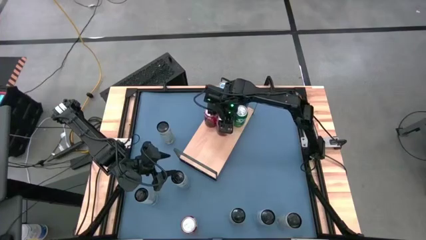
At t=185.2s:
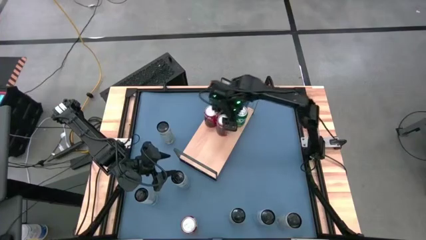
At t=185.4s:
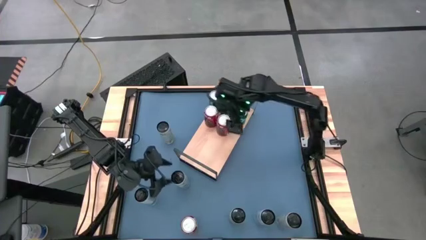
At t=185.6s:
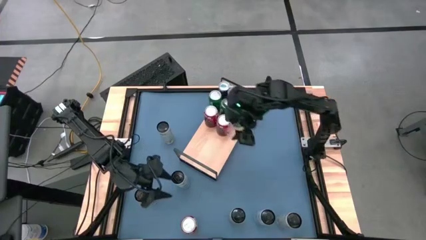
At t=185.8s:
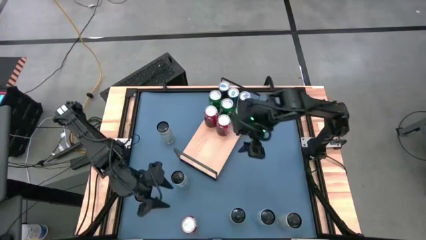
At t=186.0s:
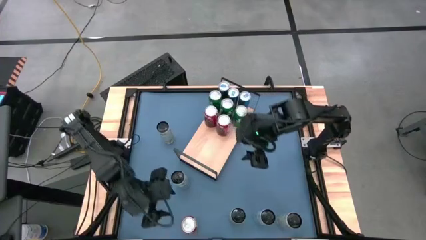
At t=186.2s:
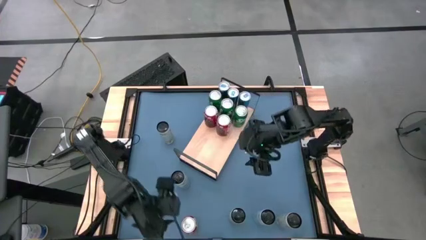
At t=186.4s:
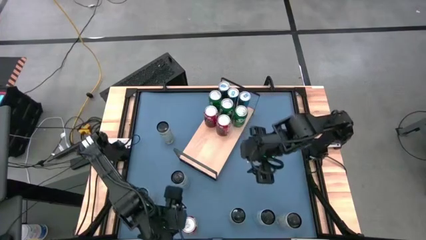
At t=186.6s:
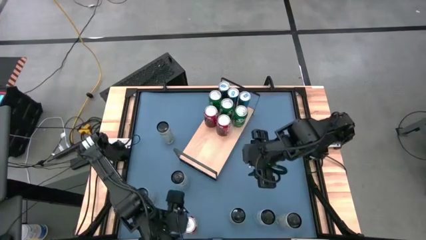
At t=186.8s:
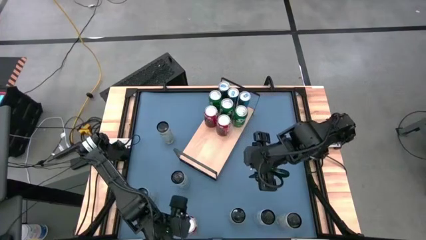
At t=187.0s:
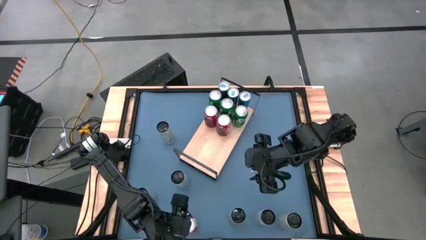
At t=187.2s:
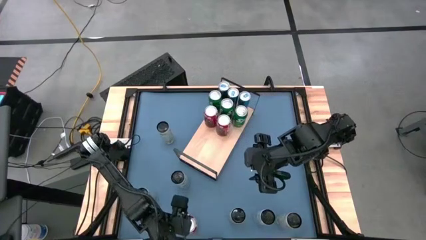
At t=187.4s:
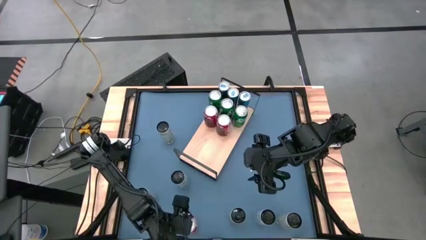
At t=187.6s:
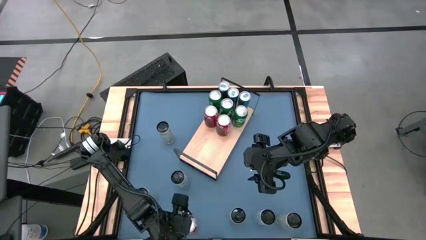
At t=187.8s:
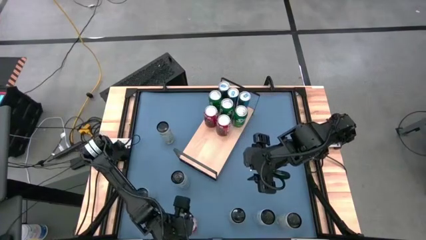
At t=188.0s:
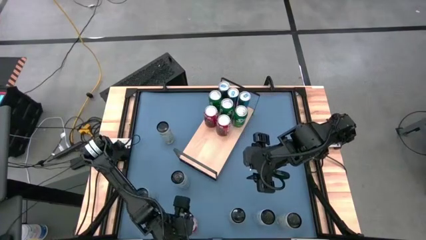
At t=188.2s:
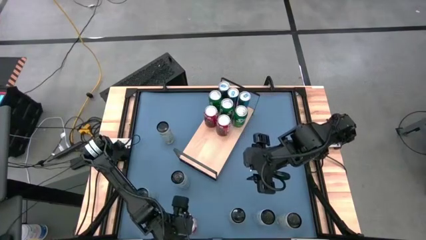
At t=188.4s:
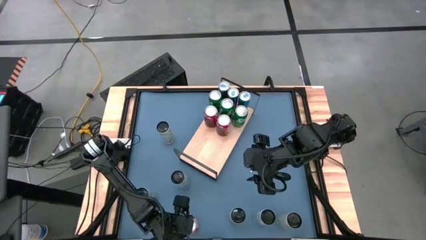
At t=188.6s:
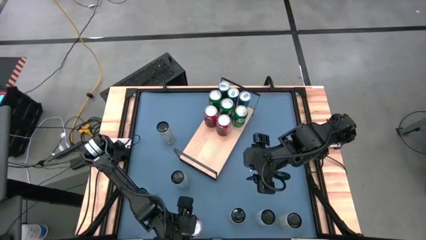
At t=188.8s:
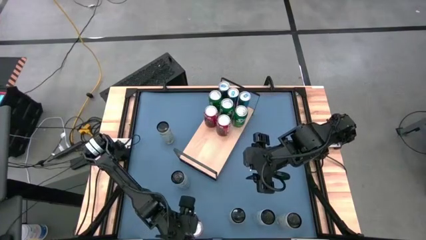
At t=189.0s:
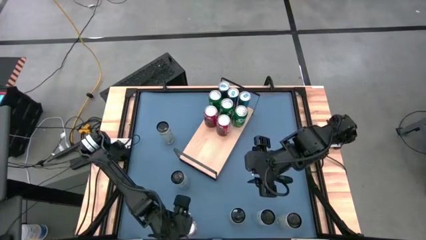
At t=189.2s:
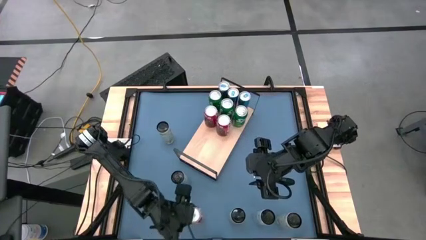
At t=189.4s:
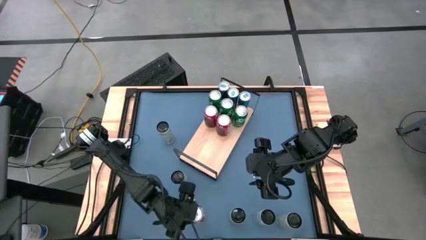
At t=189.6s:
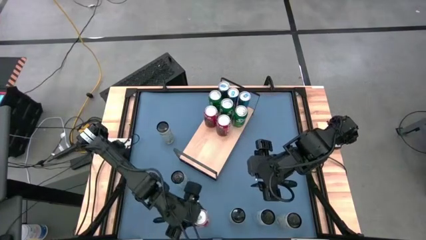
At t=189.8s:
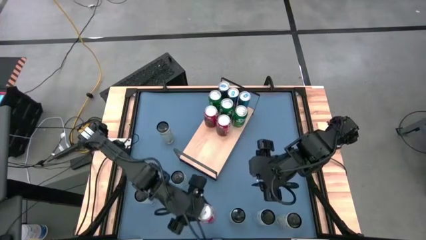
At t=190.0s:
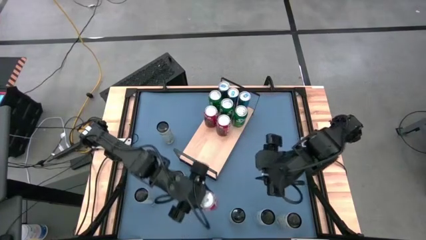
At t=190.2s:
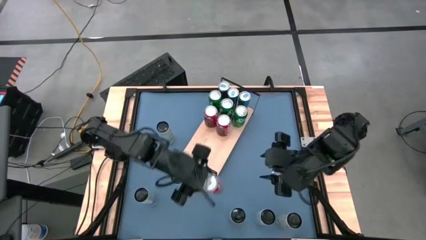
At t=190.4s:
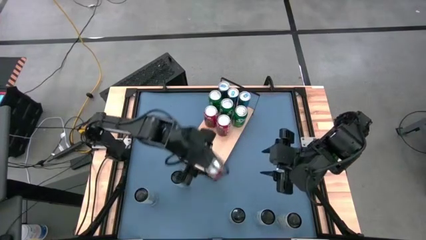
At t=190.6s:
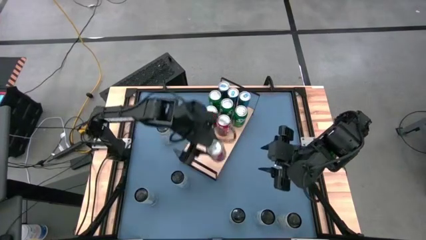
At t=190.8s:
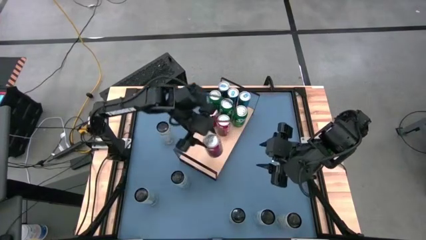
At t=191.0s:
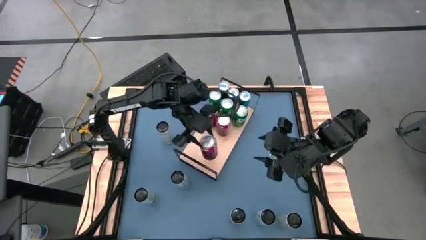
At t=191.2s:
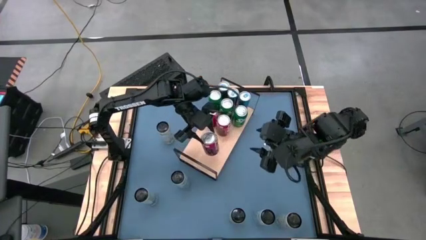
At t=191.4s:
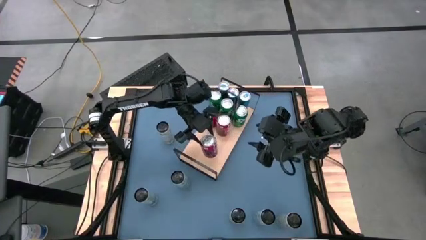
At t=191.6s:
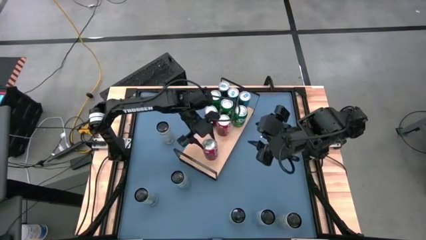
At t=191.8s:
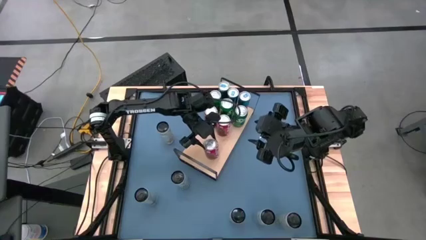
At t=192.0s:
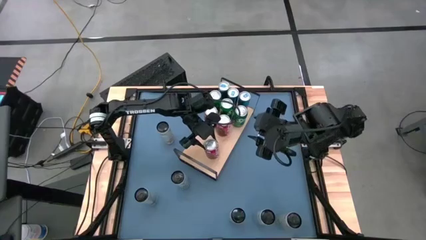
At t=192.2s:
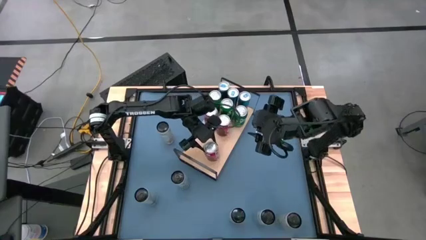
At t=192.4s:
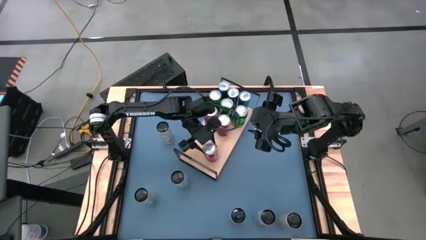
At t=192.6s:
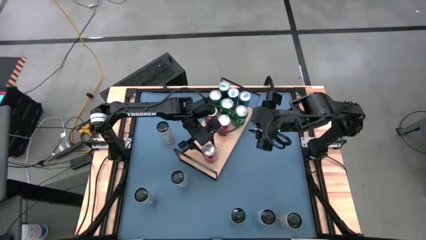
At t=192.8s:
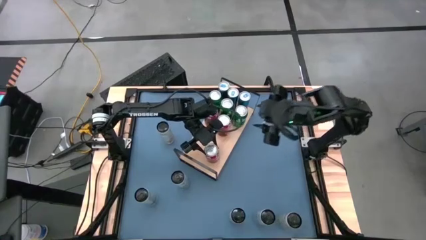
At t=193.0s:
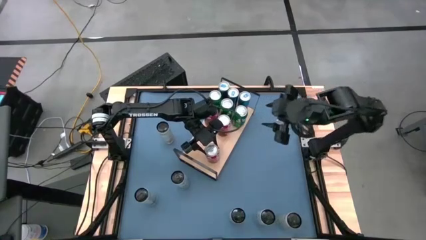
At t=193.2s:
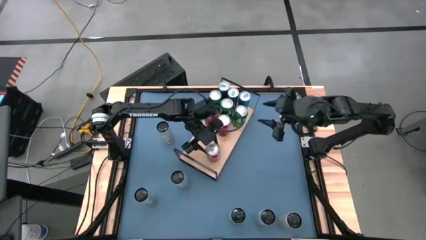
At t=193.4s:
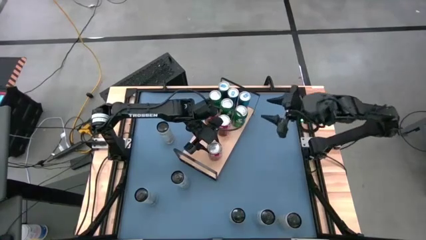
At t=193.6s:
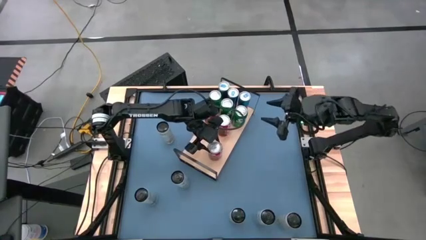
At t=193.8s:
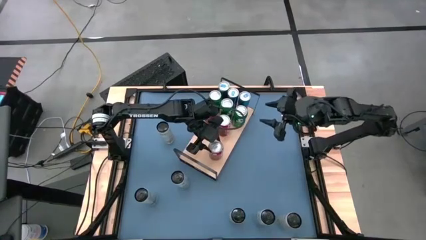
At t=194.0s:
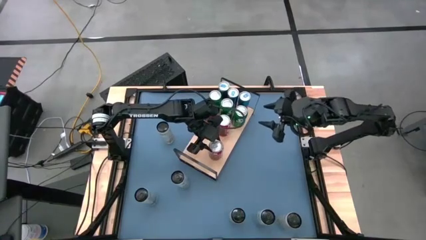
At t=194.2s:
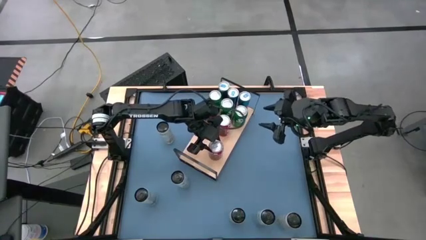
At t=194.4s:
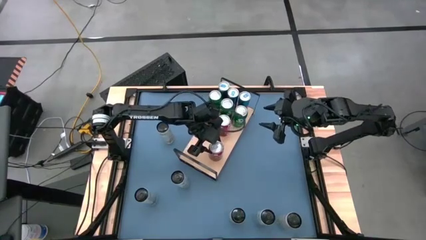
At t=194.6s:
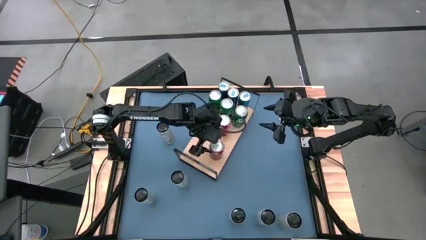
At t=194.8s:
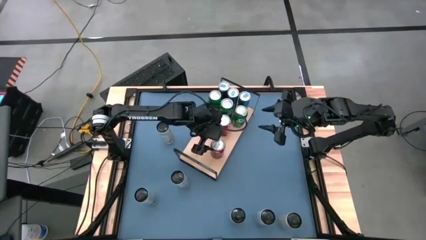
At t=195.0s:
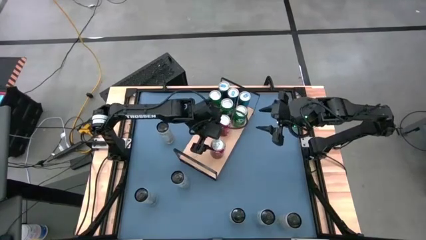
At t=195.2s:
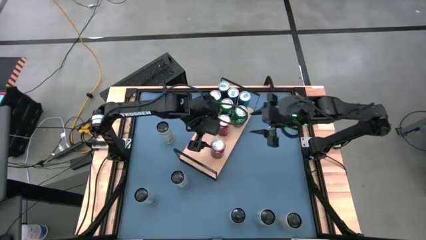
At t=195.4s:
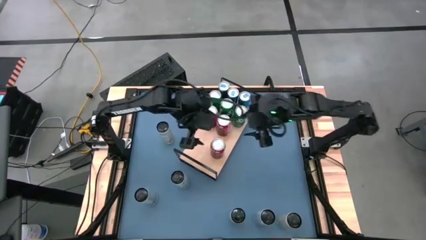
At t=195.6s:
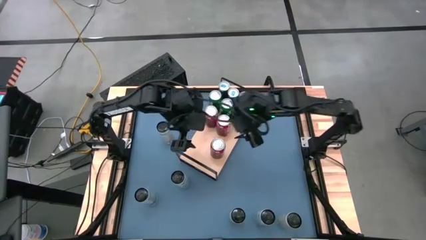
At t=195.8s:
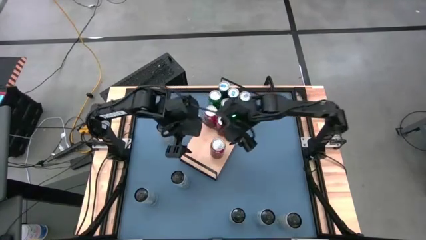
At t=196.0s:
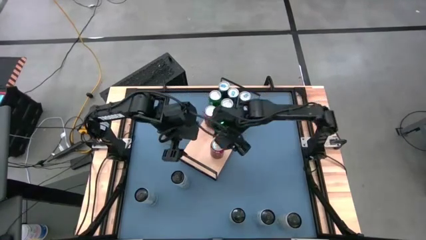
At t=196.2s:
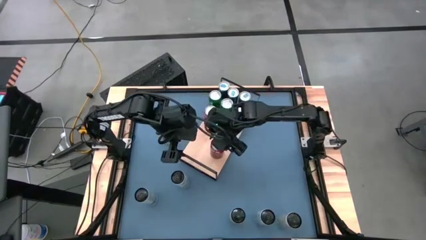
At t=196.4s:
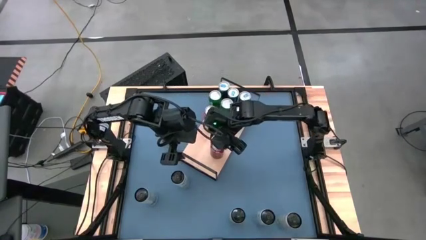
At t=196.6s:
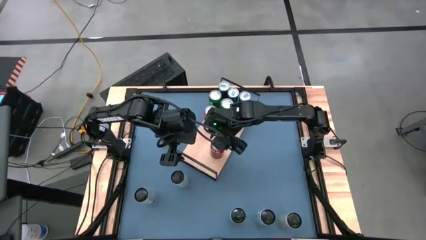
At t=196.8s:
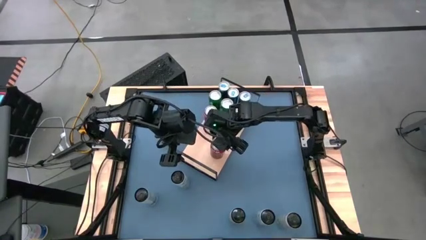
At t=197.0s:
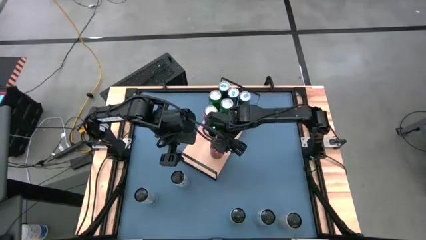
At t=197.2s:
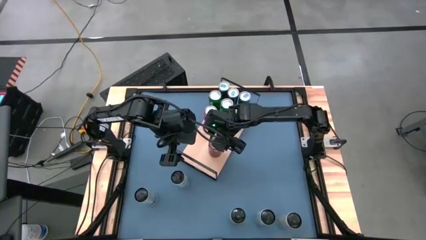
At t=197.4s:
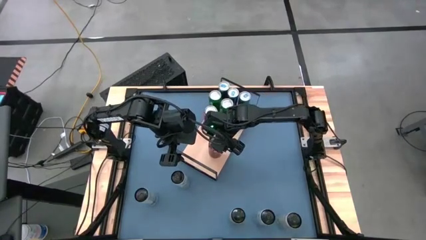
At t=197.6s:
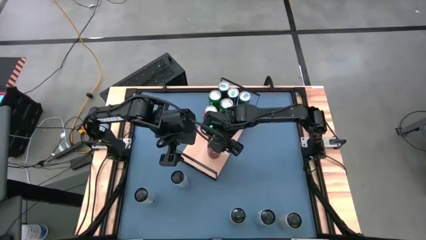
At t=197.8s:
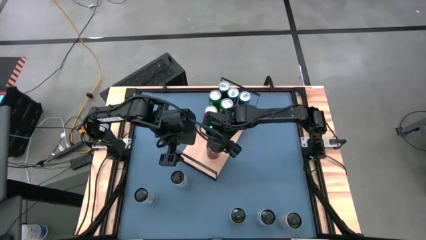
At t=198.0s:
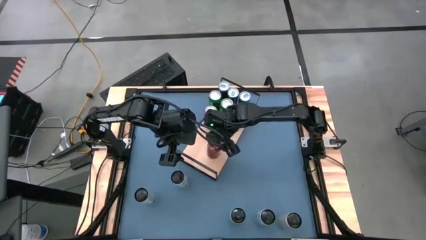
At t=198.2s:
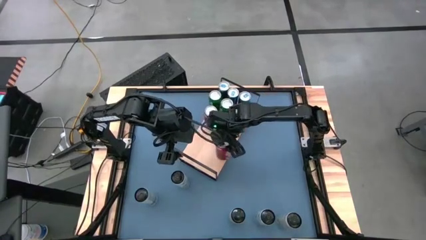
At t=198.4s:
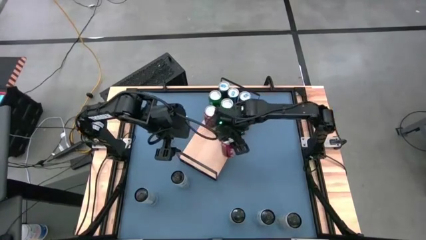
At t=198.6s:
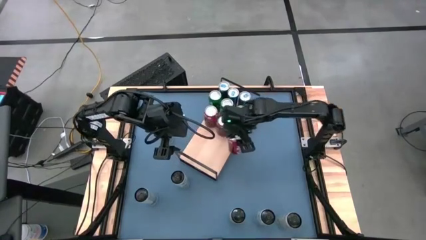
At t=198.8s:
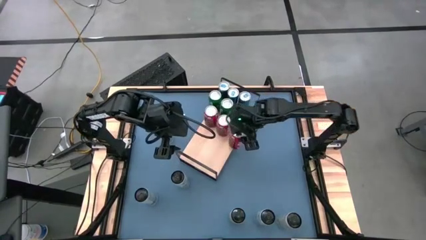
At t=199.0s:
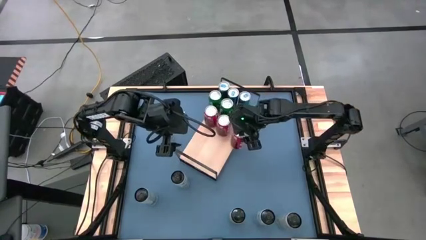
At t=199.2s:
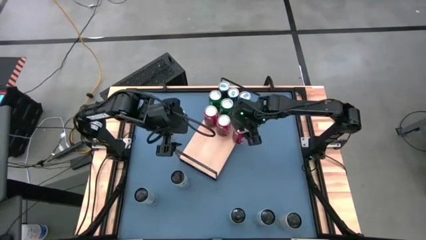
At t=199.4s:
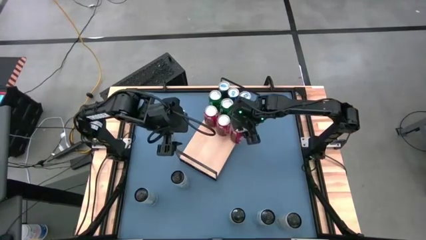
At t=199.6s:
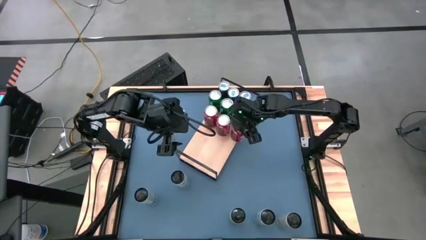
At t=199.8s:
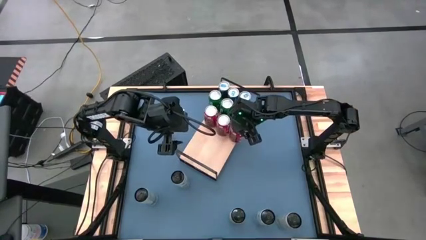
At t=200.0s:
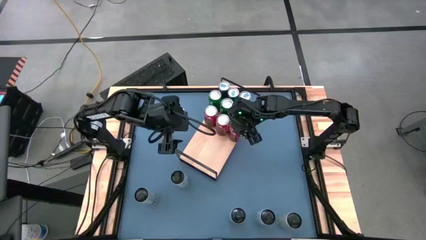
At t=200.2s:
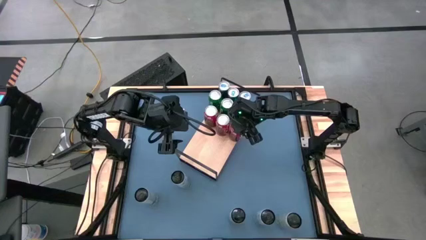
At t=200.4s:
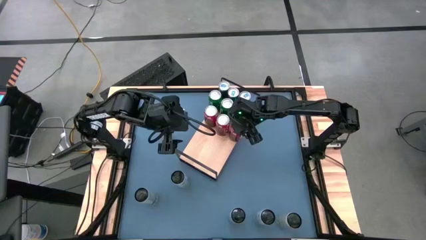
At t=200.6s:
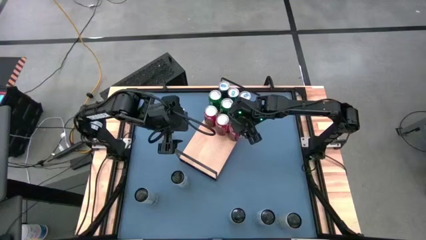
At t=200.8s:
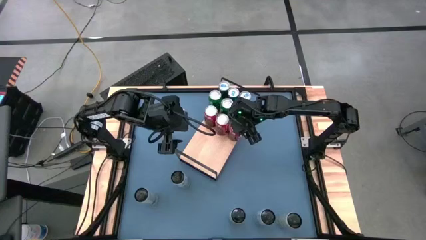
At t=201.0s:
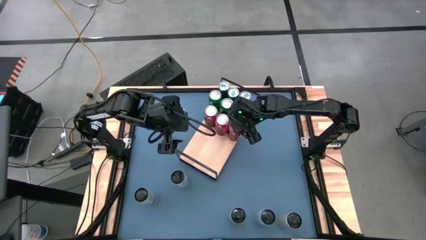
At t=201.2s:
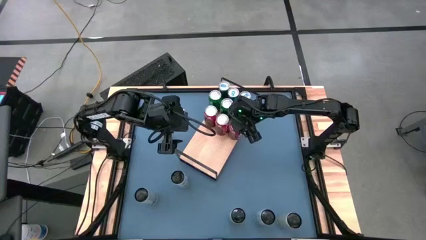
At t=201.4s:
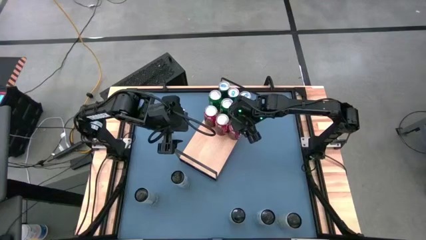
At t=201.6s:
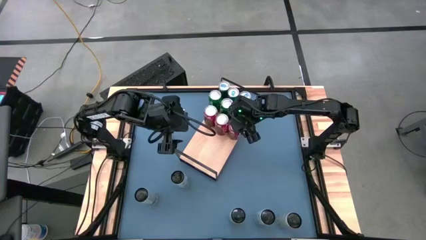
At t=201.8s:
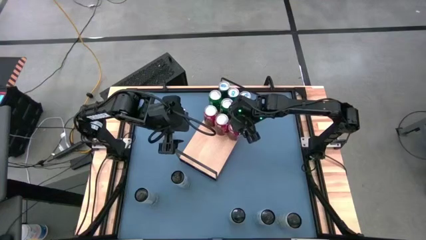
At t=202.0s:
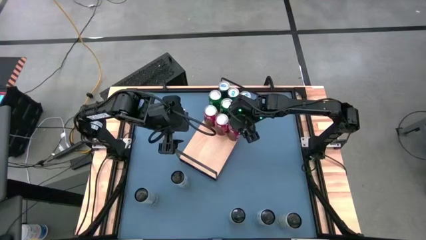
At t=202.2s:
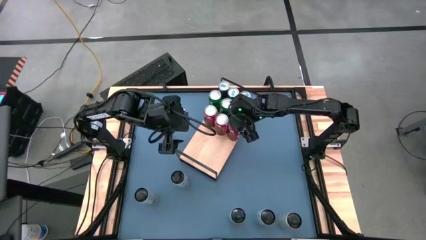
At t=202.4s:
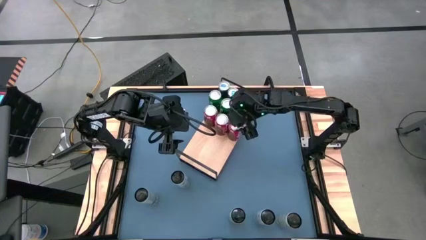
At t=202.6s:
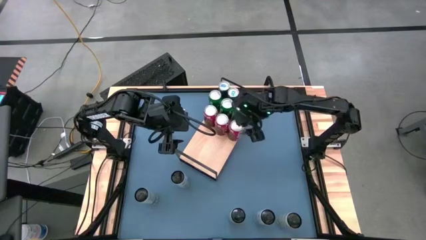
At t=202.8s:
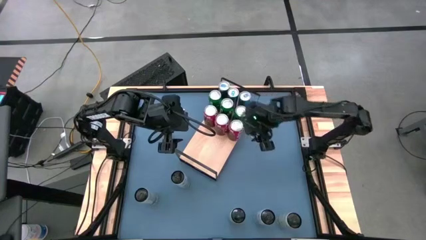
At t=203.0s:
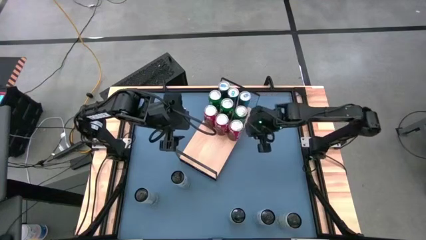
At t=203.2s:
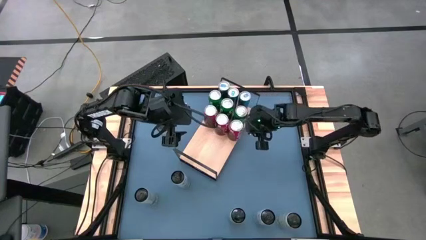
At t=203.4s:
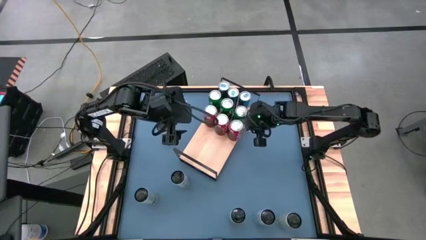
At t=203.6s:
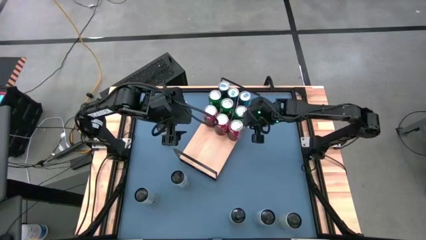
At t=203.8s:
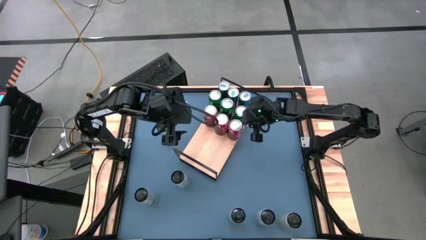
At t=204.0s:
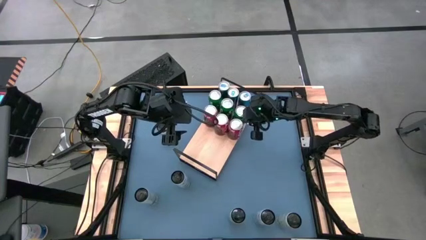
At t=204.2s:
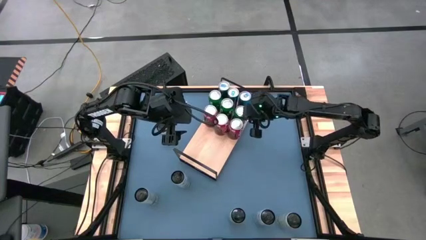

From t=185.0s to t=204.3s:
Task: Place canned beverage on shelf
Put red soda can on the shelf aligned with the other red soda cans
